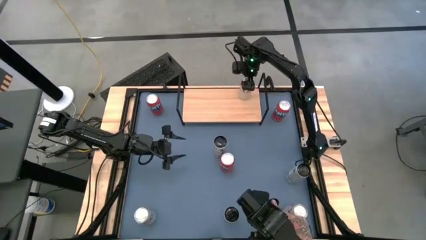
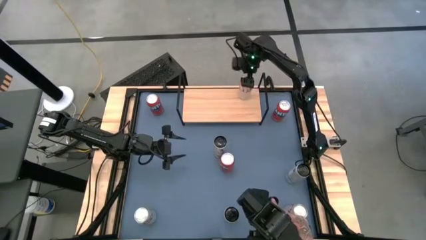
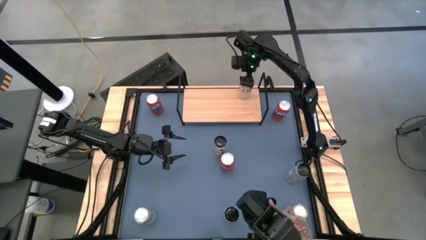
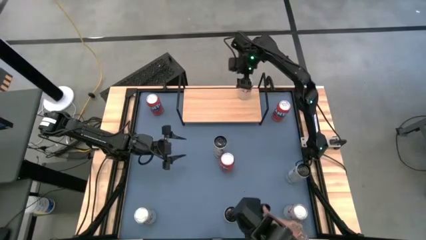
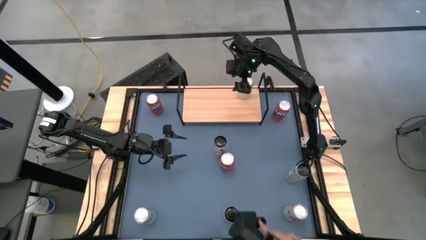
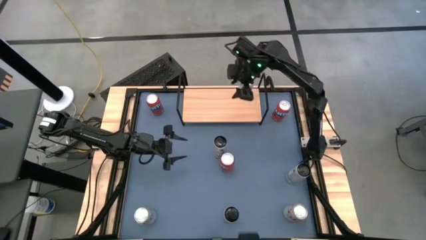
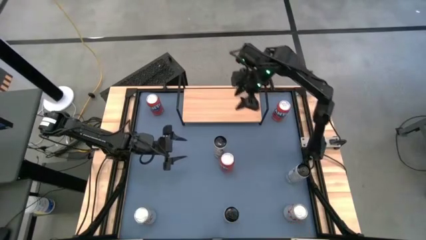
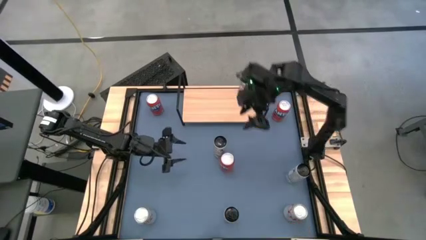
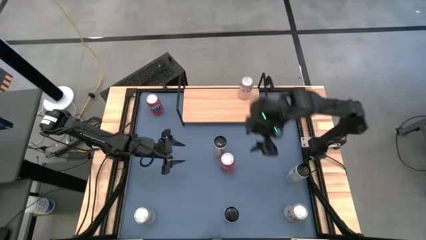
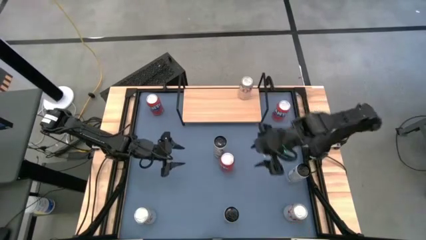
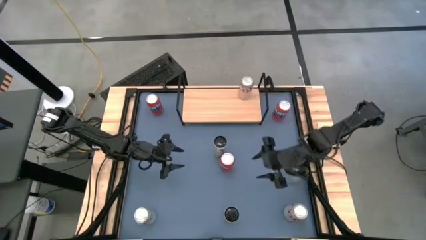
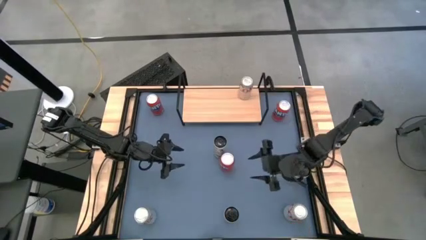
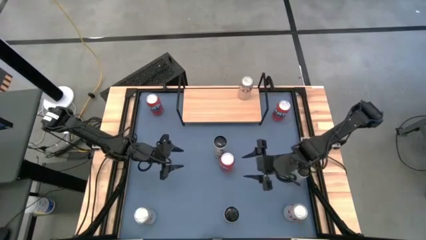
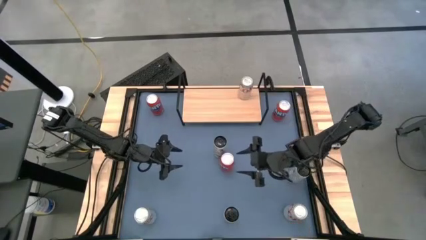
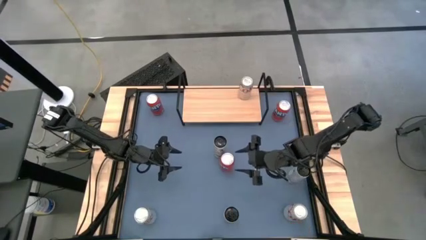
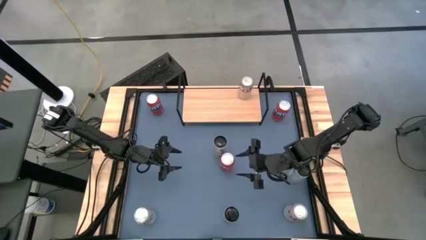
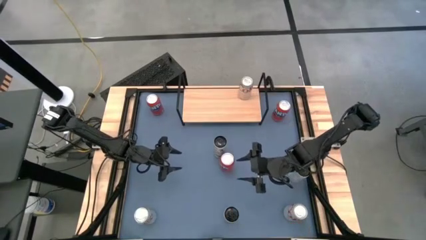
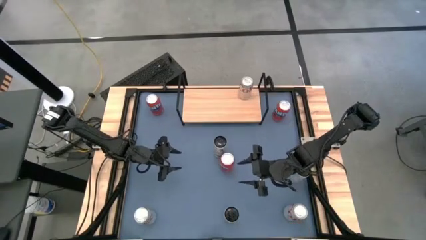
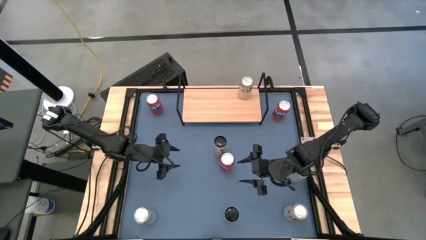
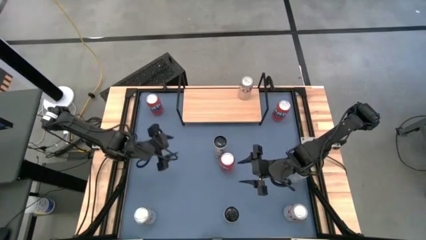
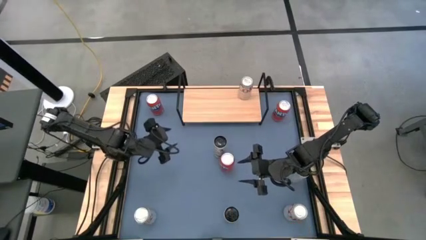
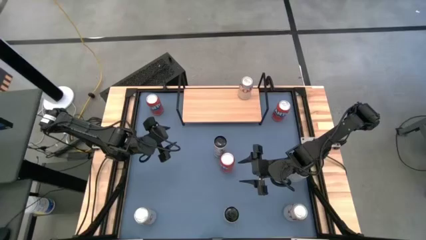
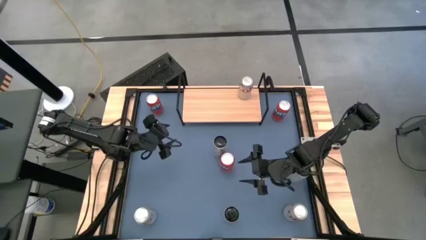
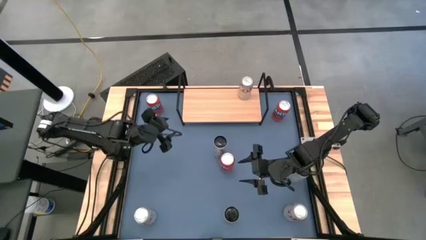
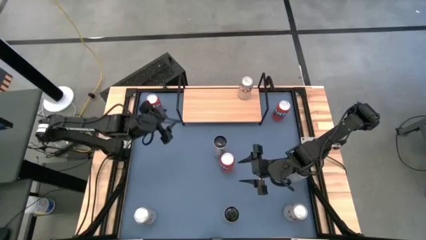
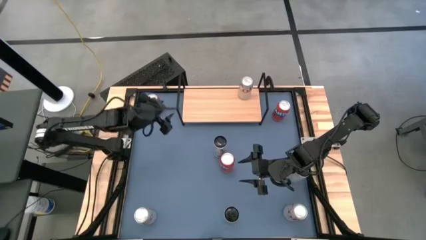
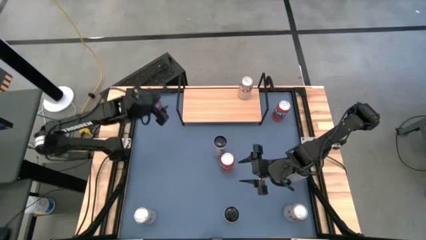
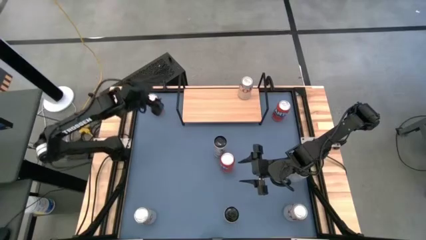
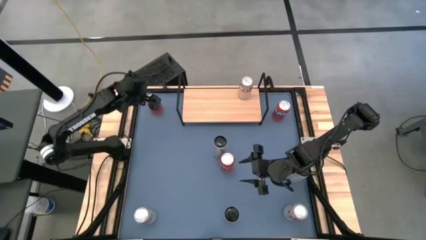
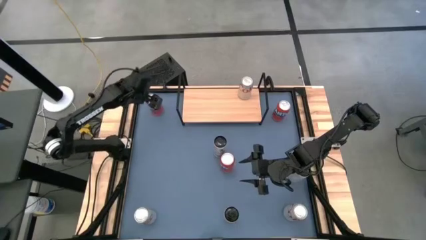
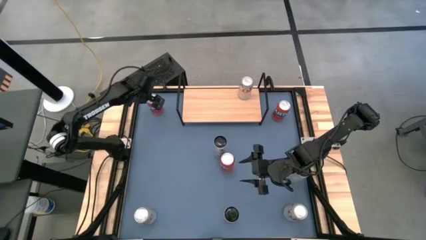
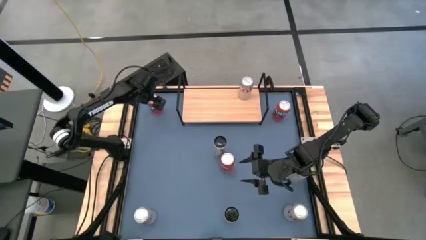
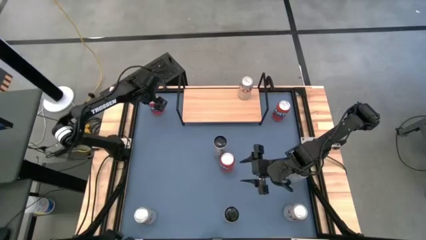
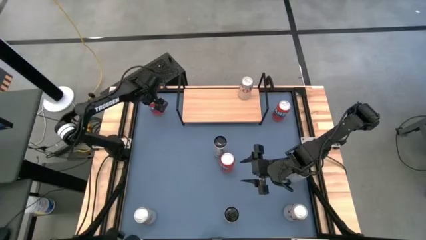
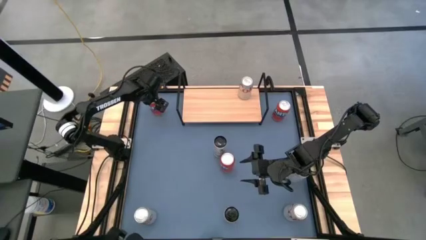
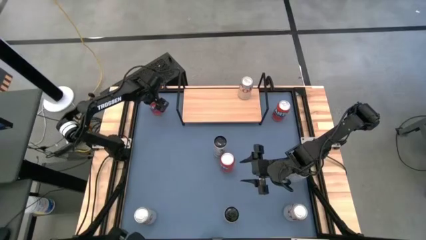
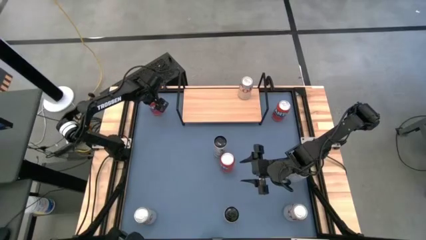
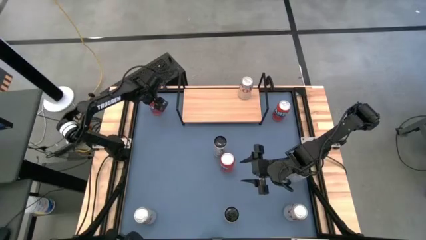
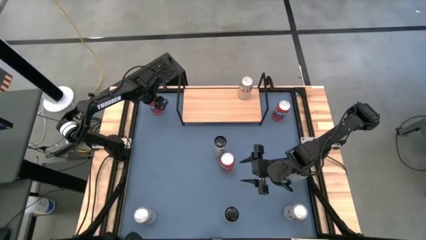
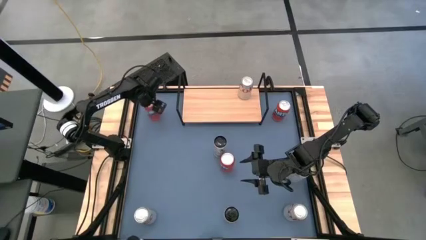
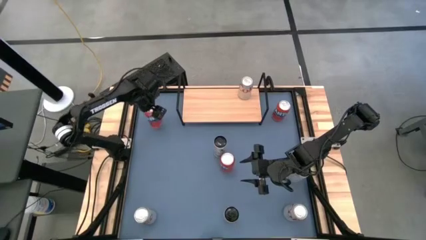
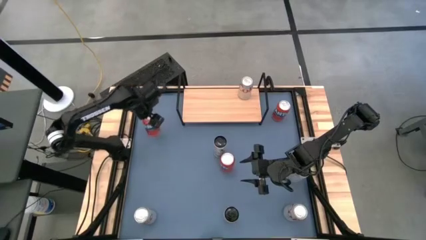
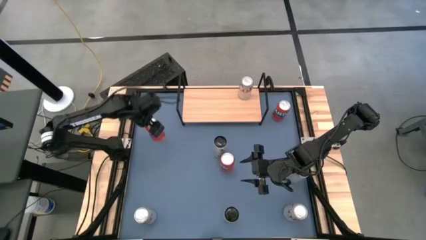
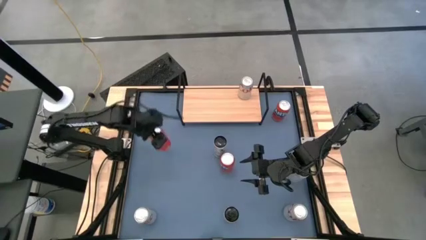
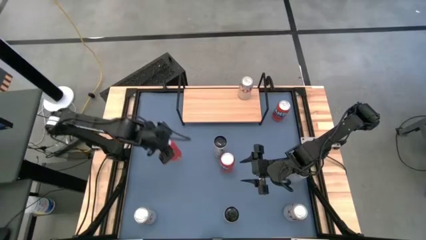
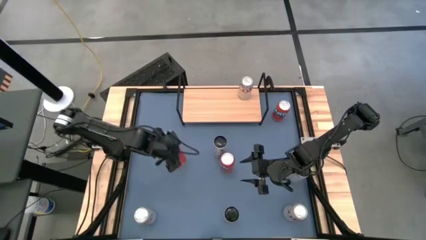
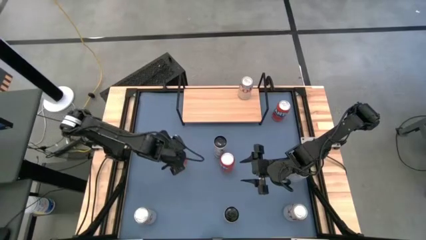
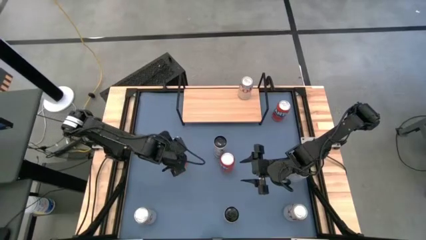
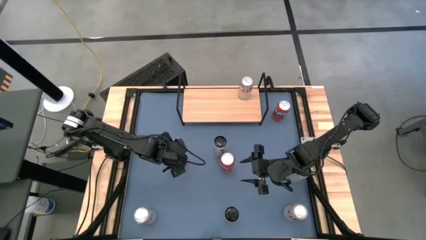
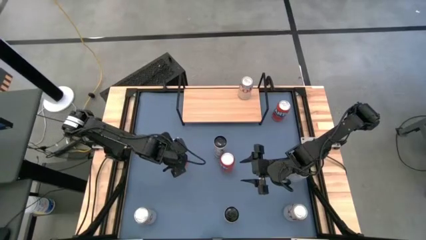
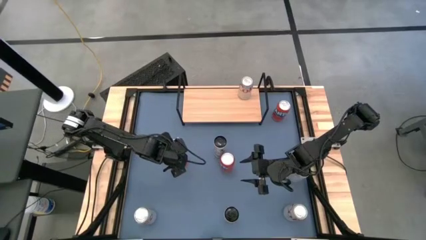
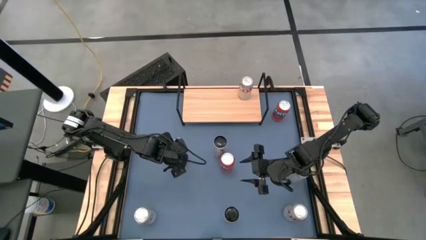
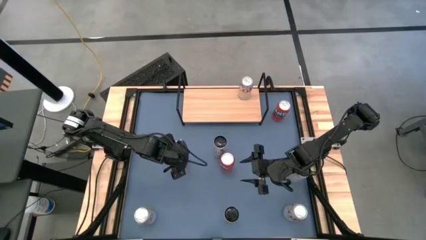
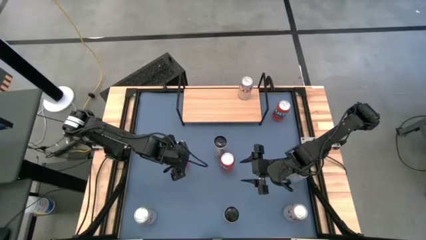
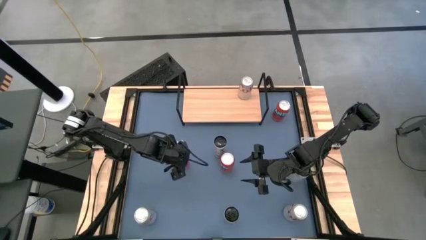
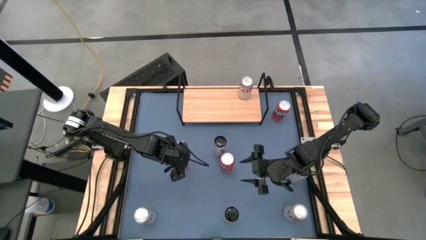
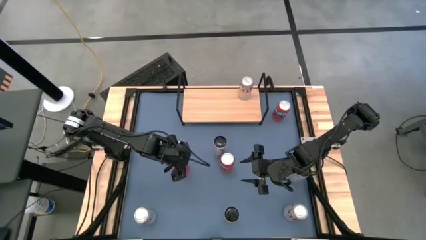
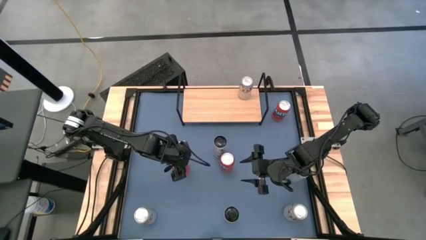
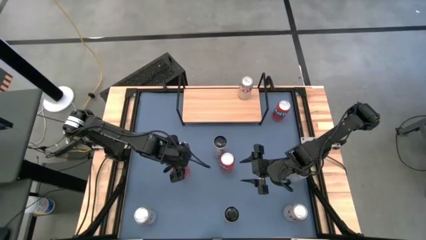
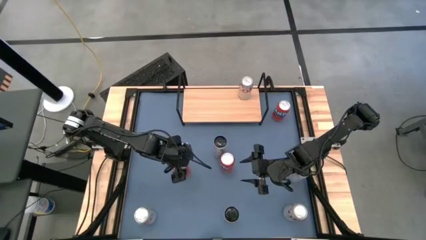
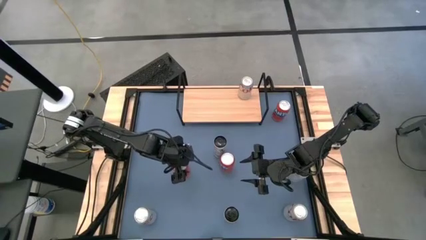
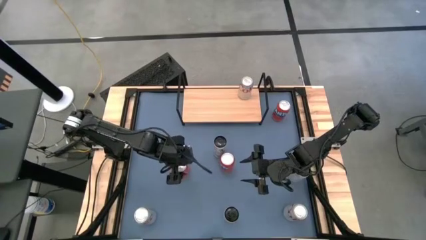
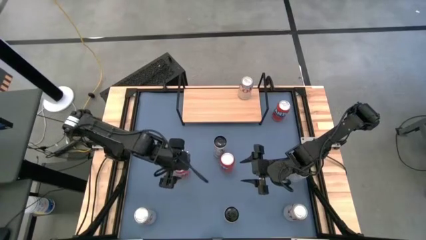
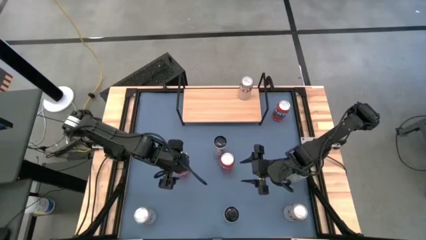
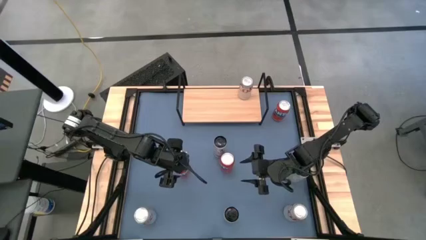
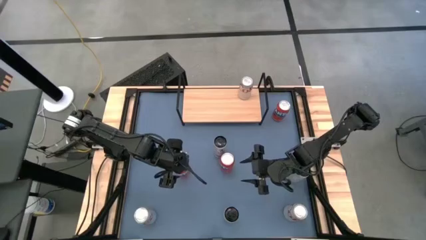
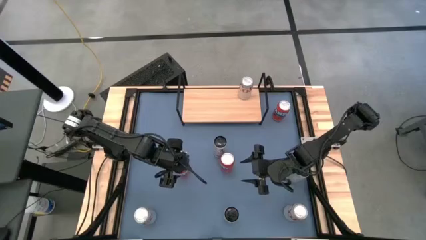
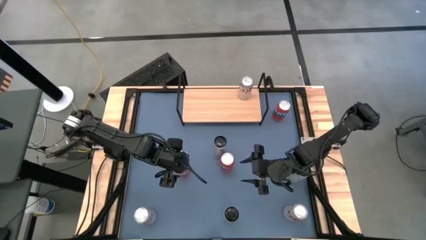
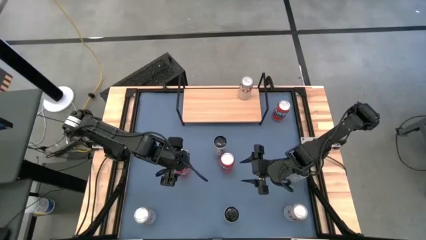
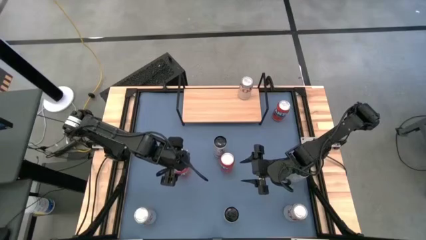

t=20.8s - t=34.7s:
Task: Place canned beverage on shelf
Put the top left orange soda can on the shelf

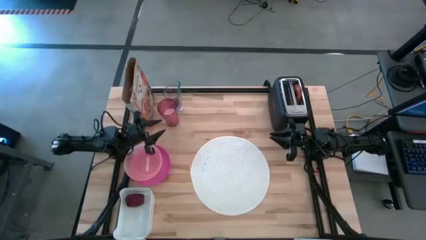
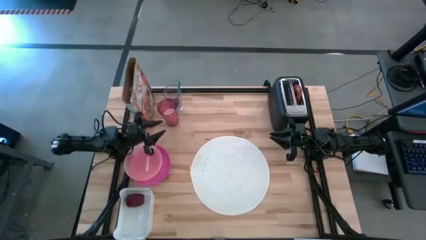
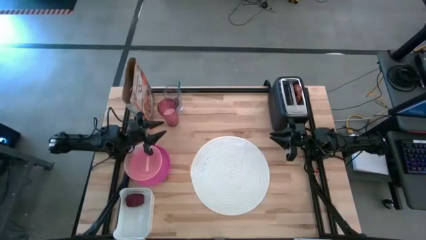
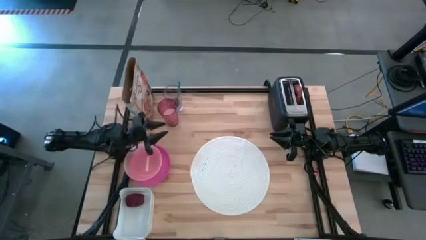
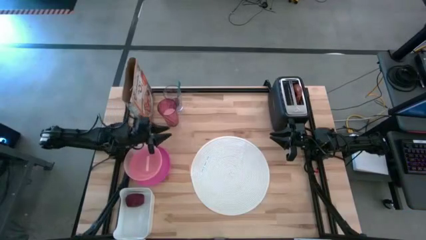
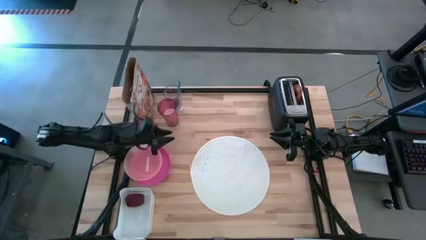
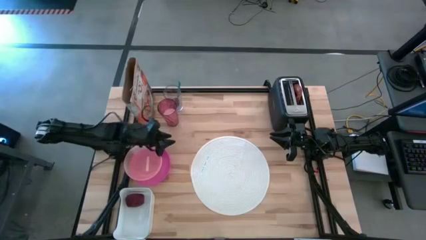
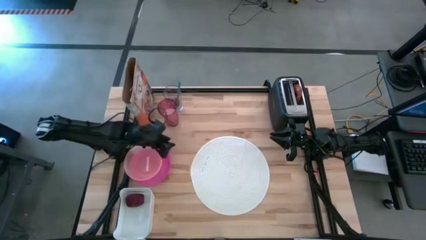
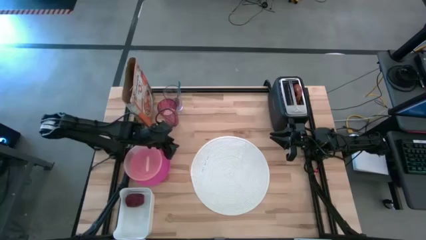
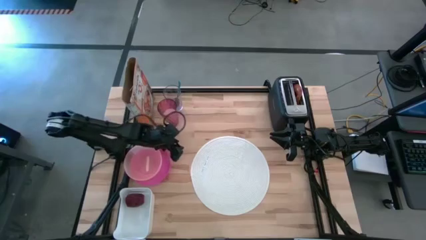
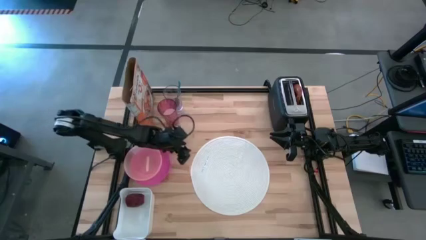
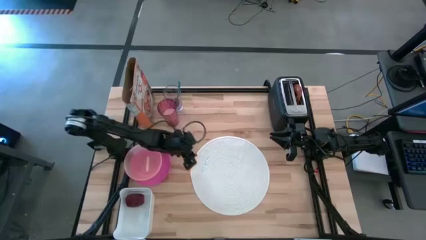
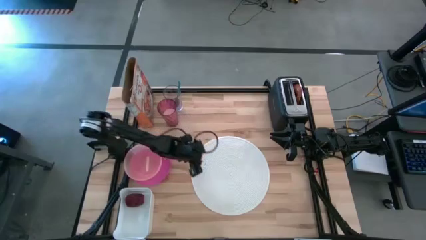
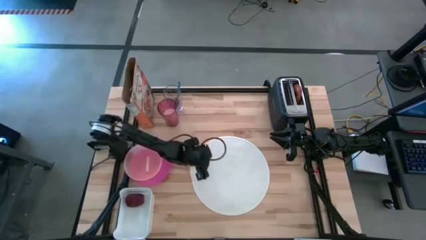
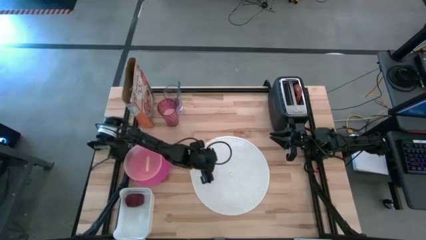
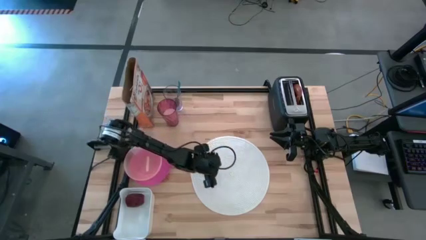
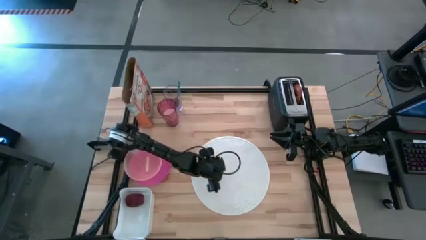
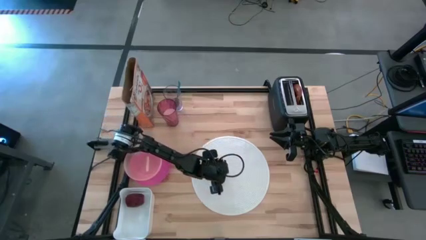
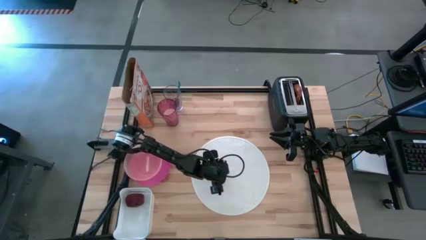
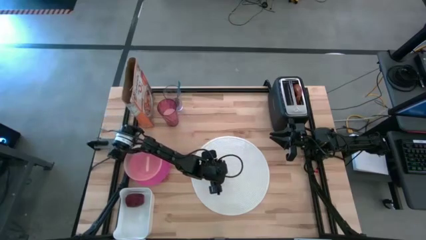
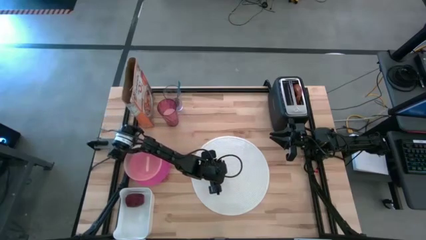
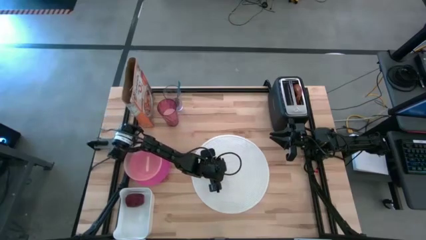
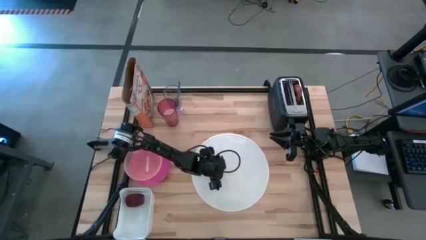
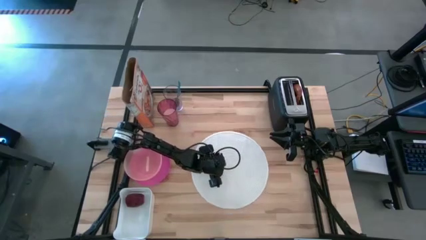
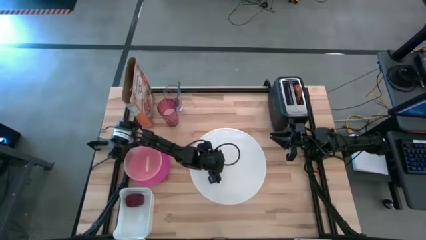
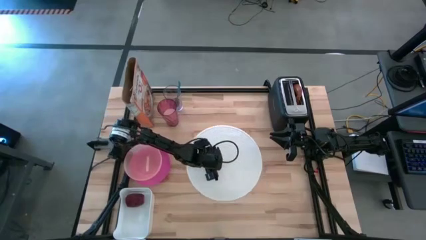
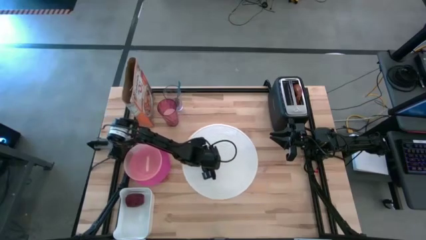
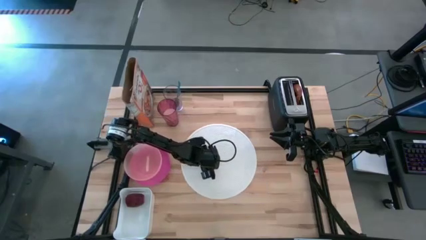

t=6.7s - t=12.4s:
Task: Arrange a breakfast setting
Adjust the white placemat
